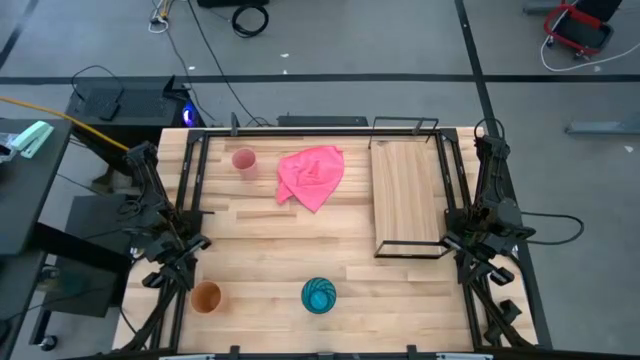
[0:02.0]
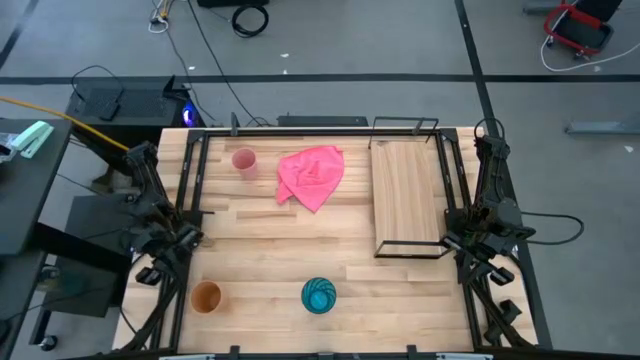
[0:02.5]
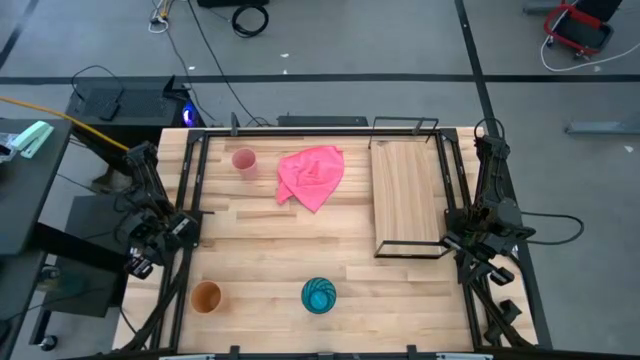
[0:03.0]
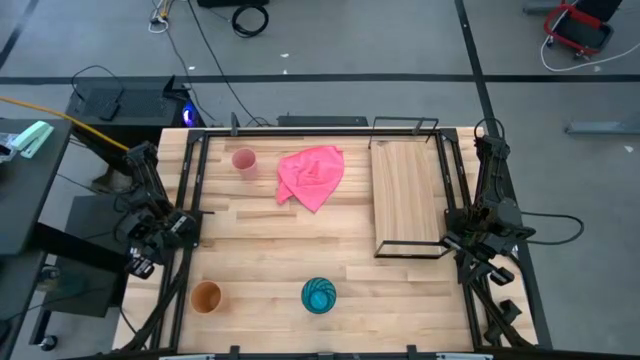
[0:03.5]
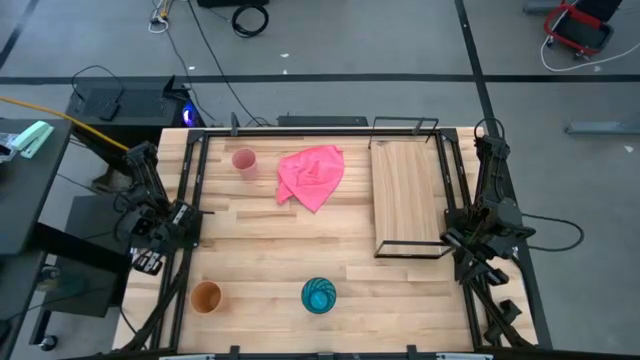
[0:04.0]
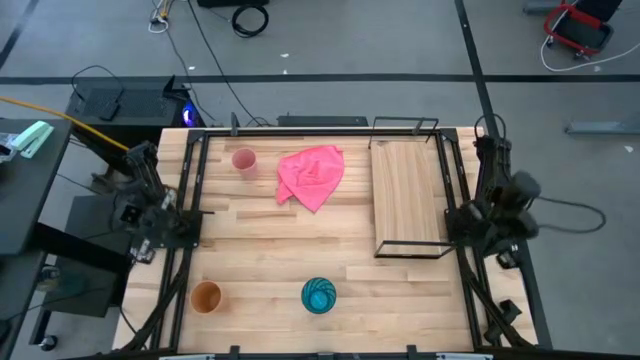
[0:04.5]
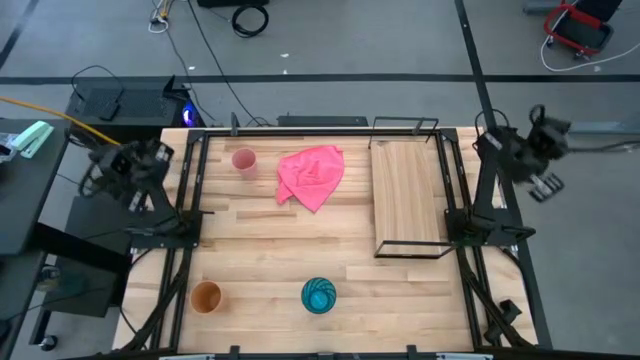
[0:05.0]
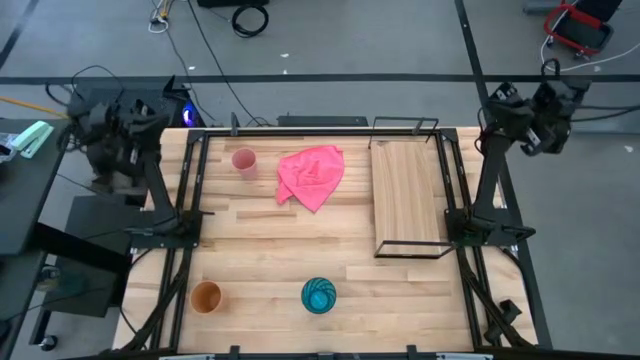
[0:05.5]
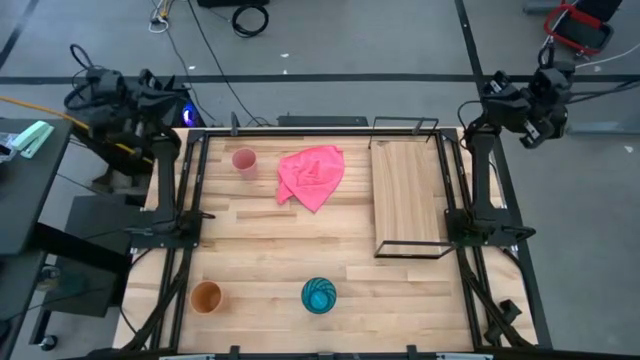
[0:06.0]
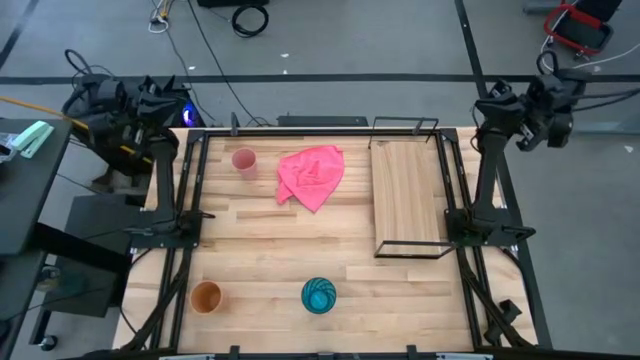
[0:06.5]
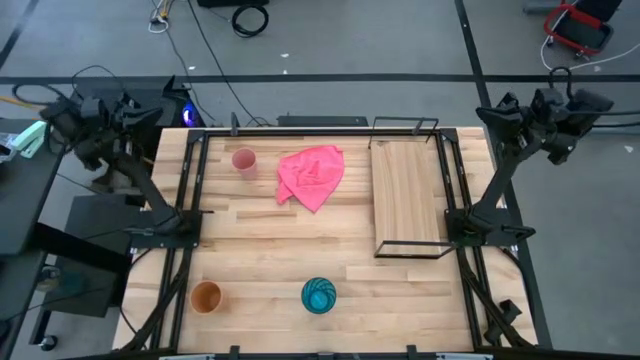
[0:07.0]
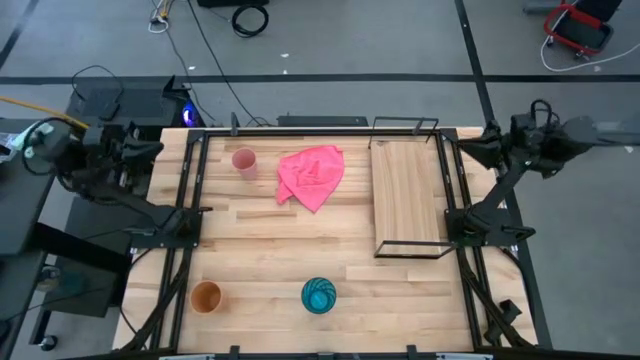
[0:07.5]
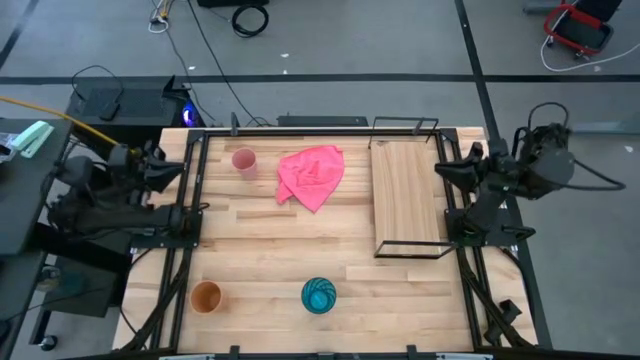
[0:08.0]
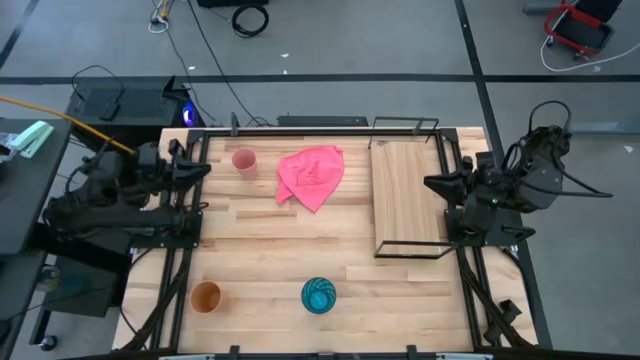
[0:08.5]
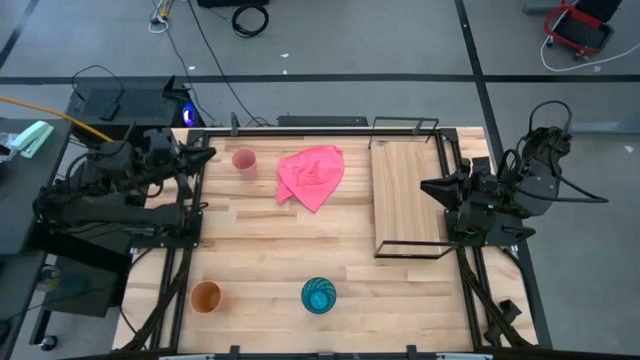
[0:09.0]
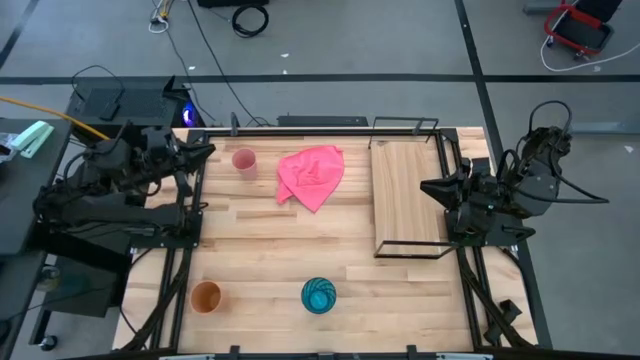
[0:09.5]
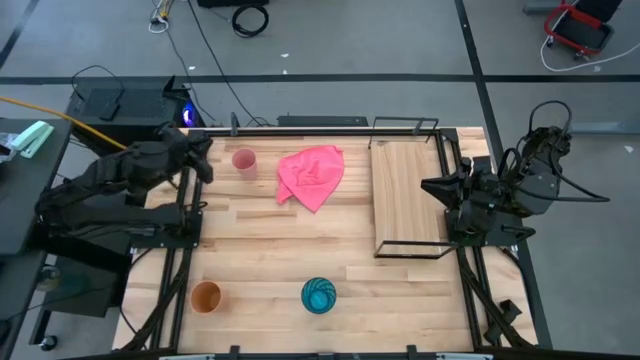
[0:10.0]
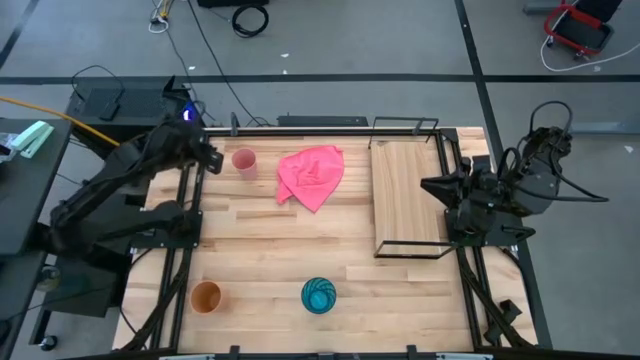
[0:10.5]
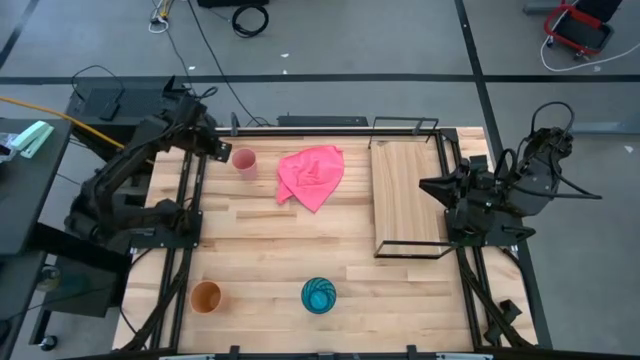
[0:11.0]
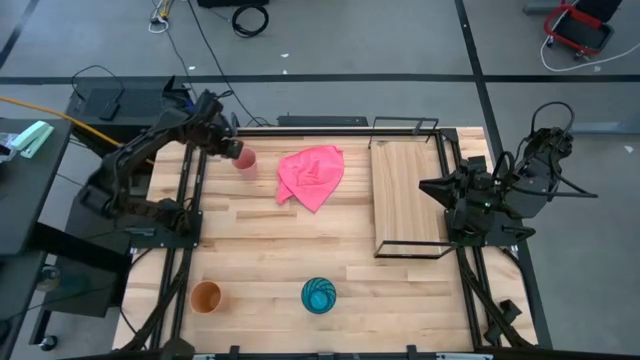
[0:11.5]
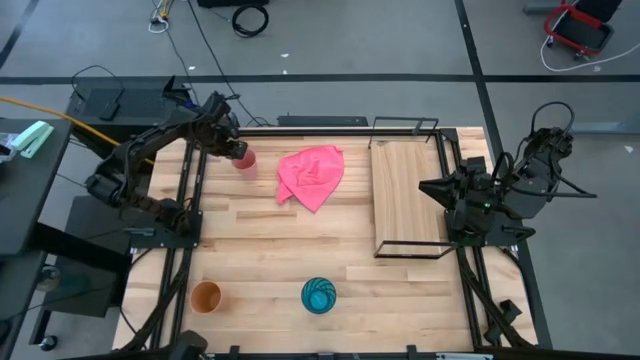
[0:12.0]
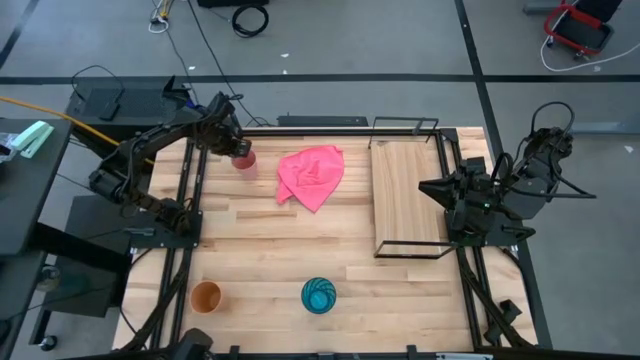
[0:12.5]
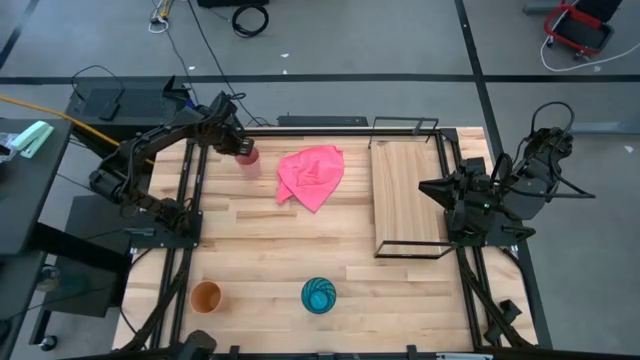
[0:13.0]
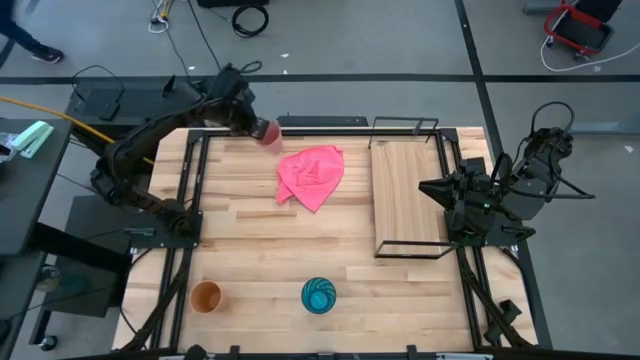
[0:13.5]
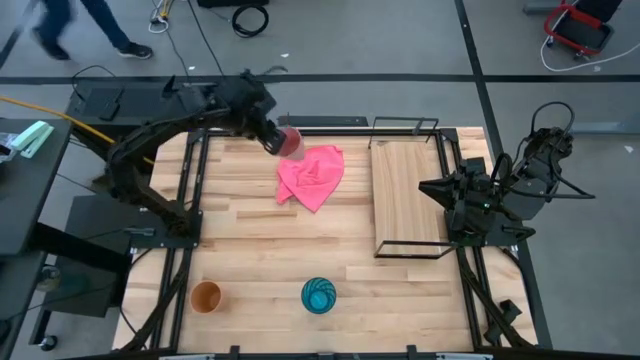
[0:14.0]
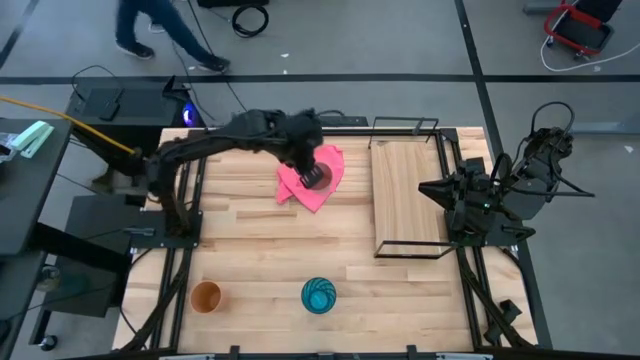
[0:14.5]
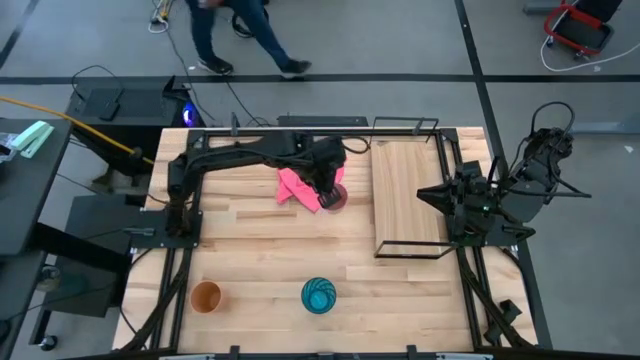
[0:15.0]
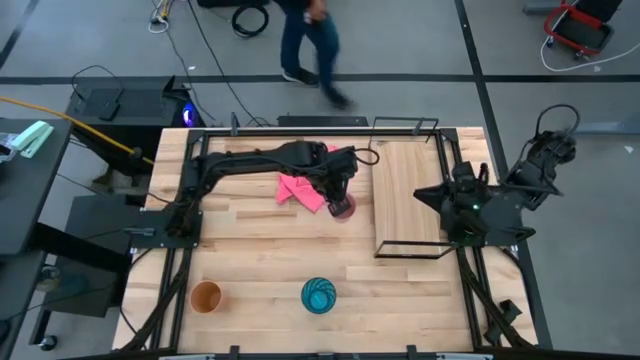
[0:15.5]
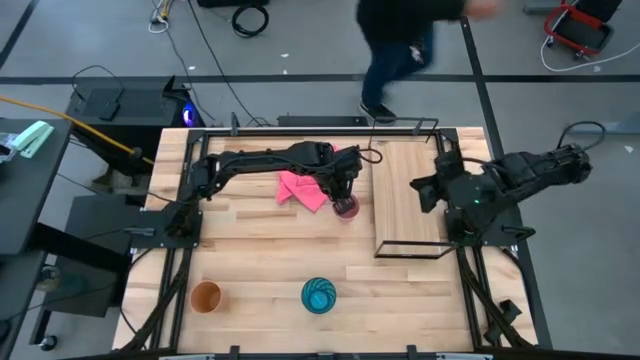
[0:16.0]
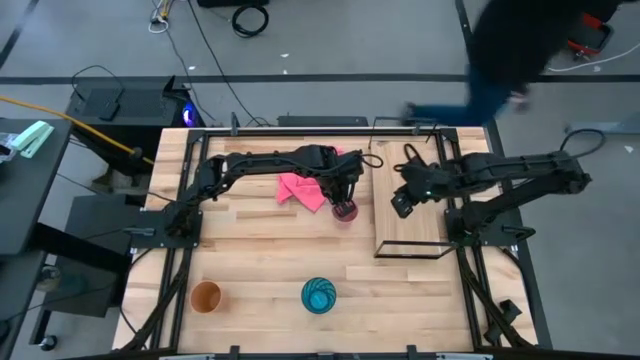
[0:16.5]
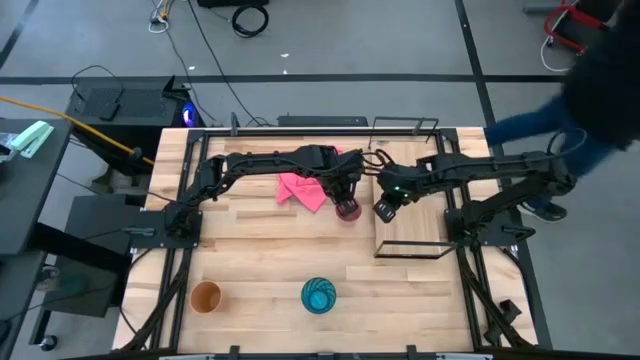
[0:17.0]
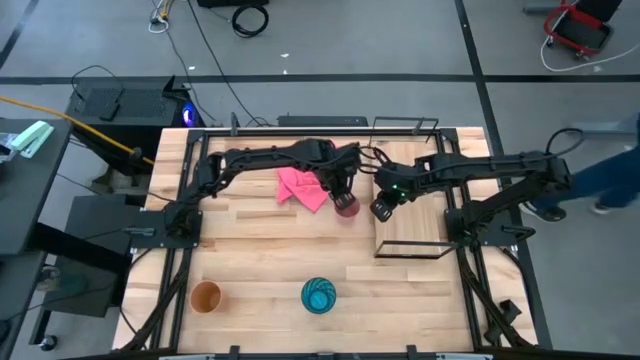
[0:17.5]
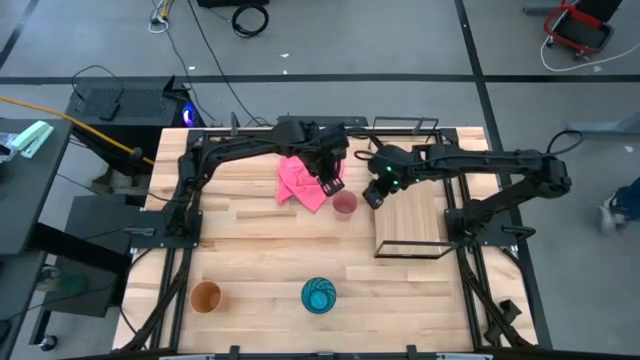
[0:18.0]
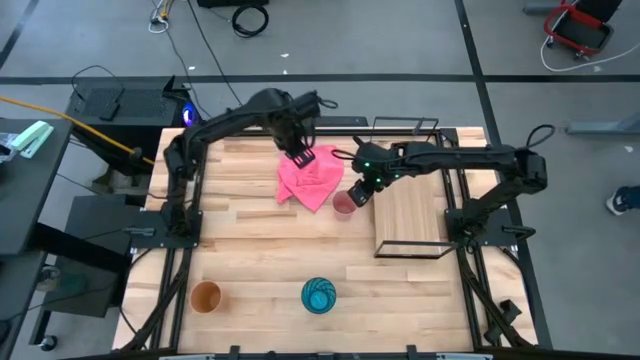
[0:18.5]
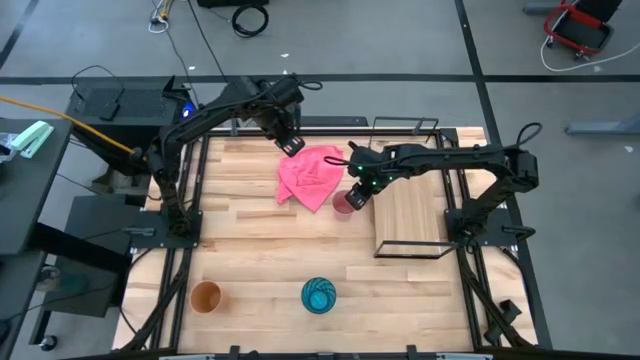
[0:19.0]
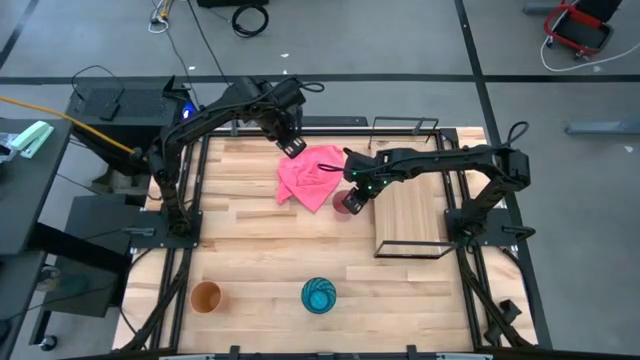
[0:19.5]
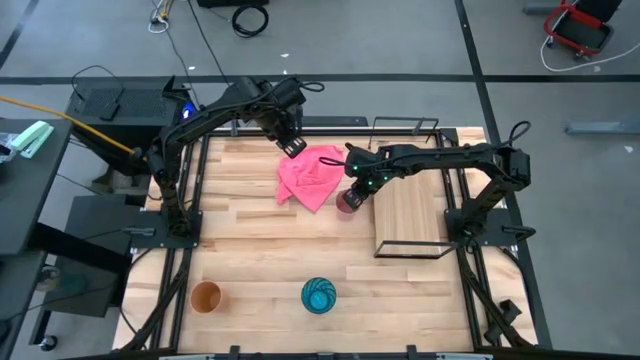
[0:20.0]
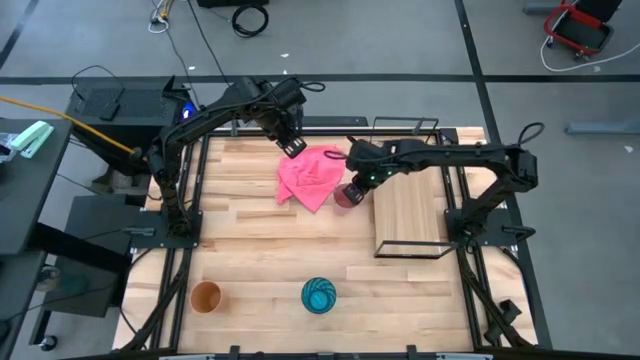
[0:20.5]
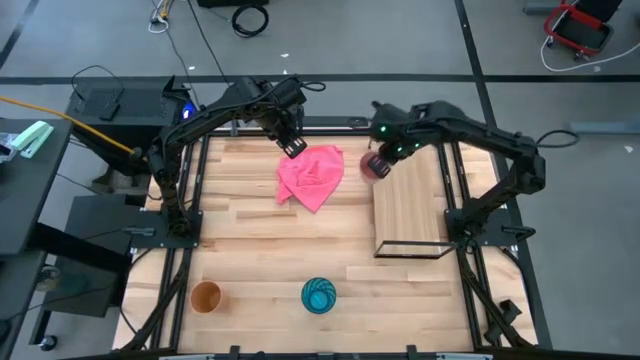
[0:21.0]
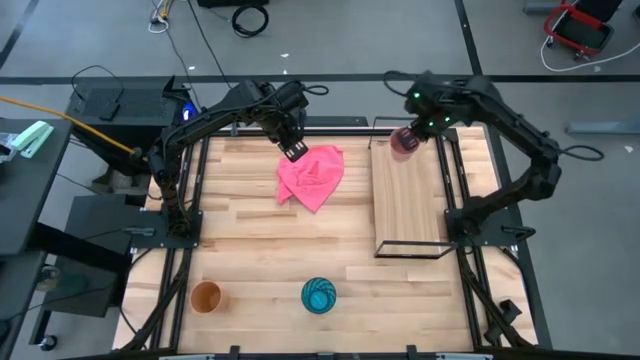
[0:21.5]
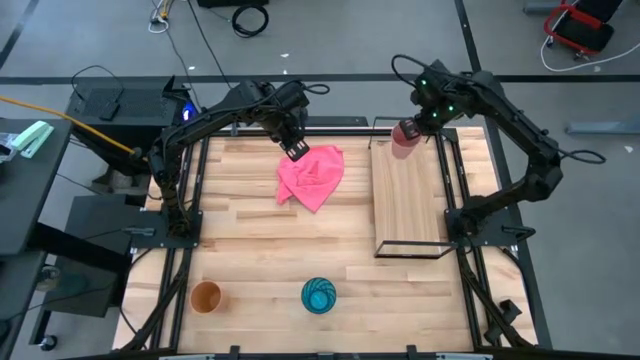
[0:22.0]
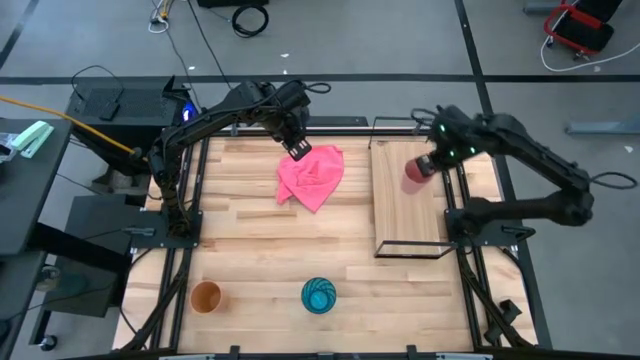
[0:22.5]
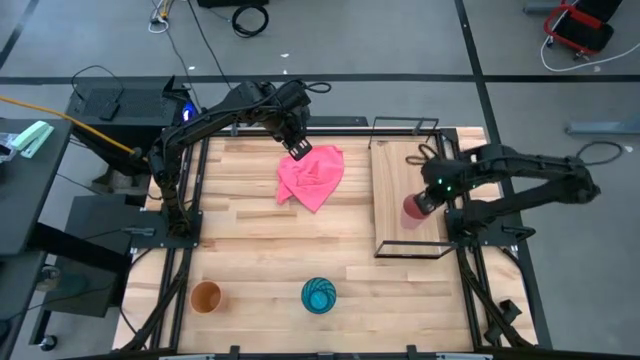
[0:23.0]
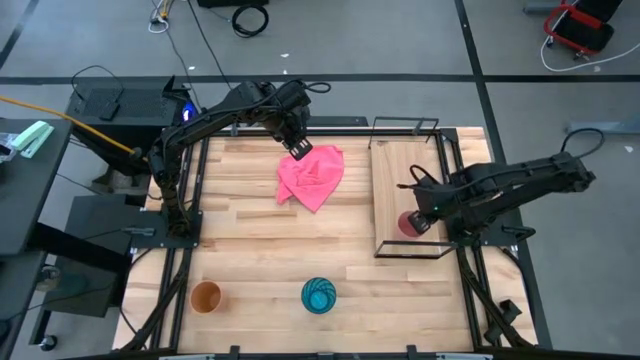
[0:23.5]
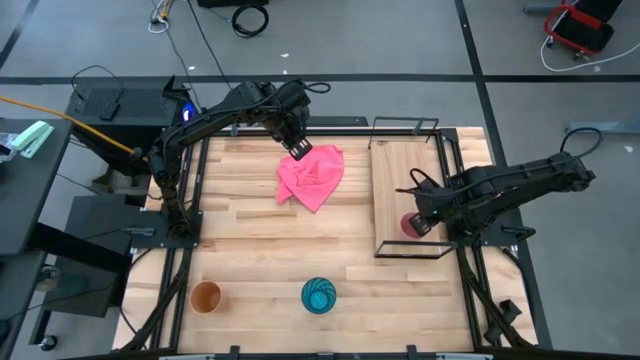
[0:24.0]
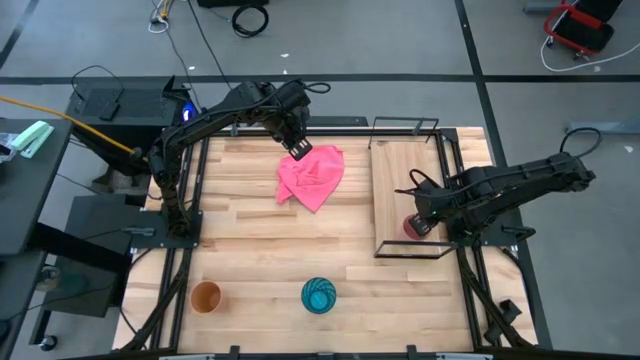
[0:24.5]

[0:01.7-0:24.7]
Task: Stack small to large cups/mugs on shelf
Put the pink plastic cup on the shelf
